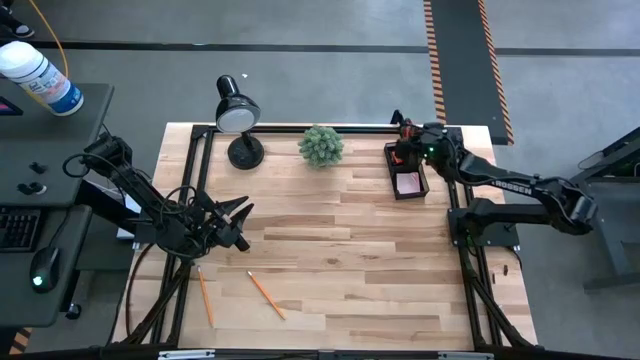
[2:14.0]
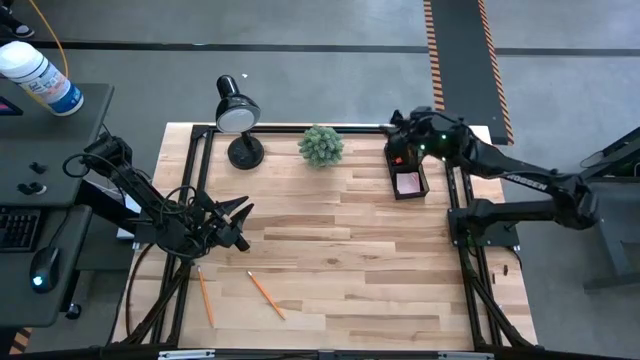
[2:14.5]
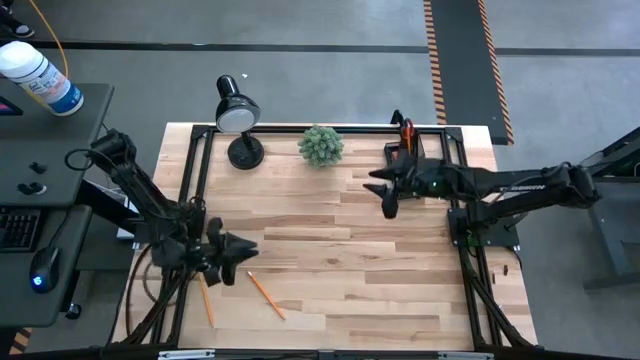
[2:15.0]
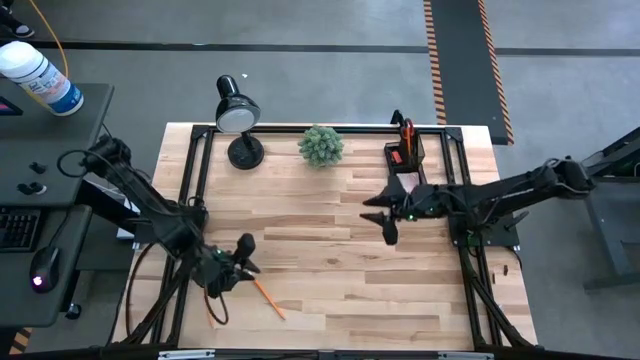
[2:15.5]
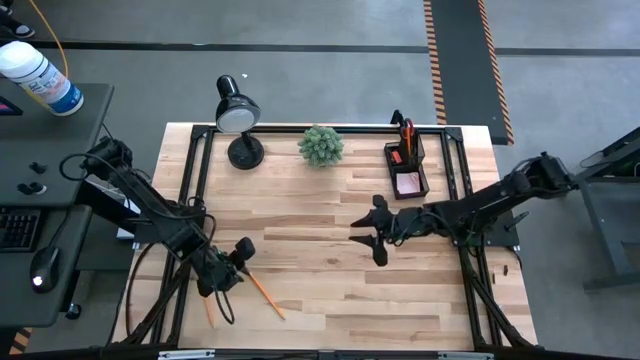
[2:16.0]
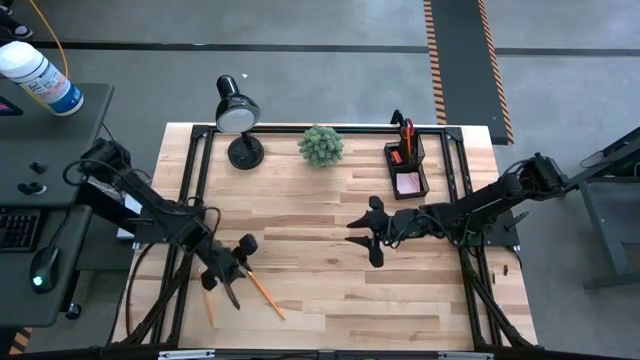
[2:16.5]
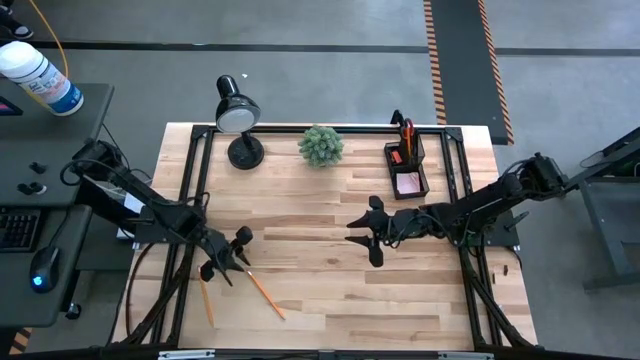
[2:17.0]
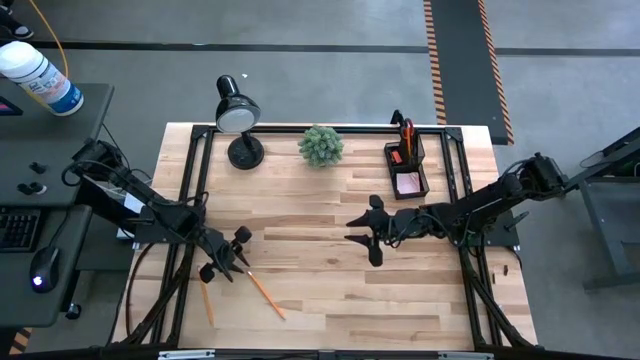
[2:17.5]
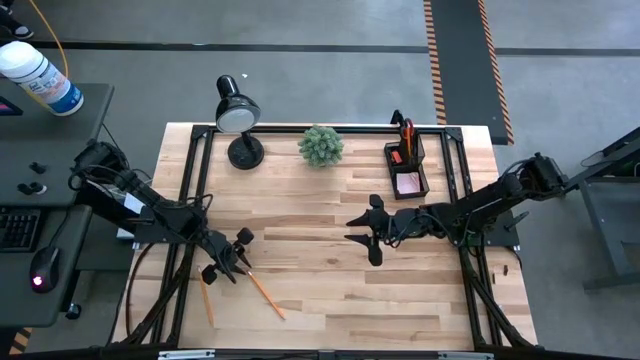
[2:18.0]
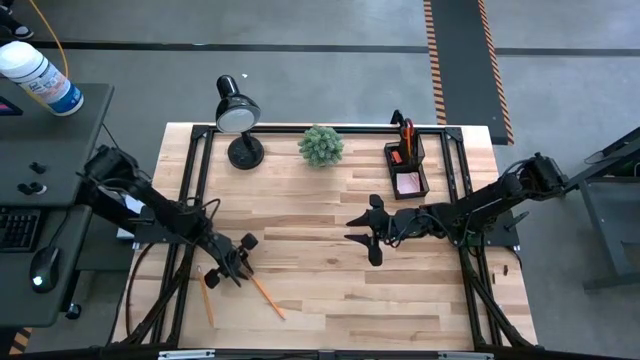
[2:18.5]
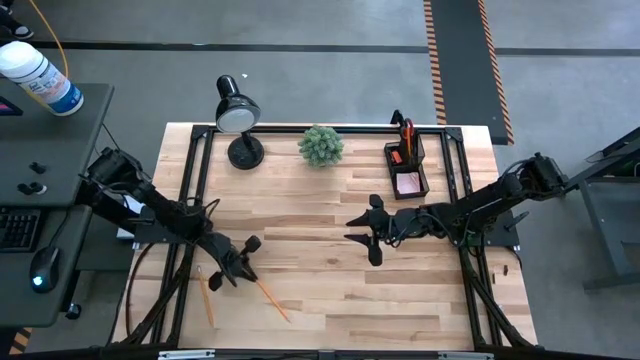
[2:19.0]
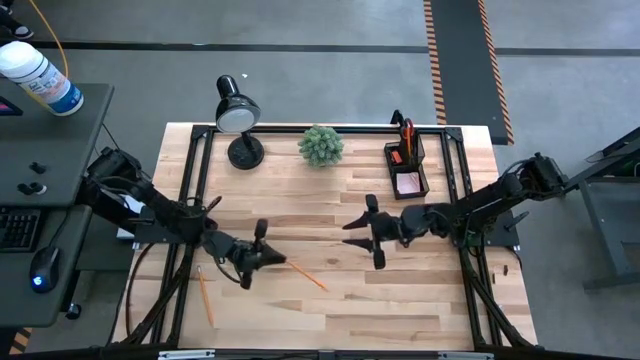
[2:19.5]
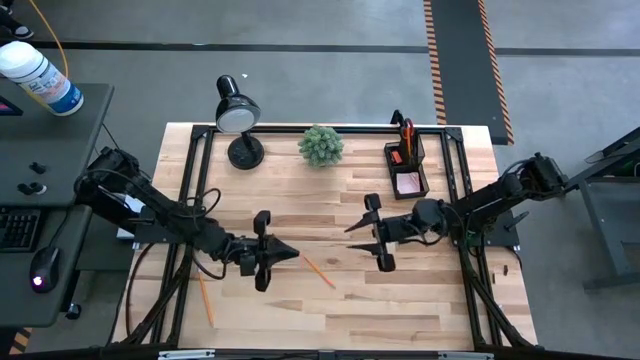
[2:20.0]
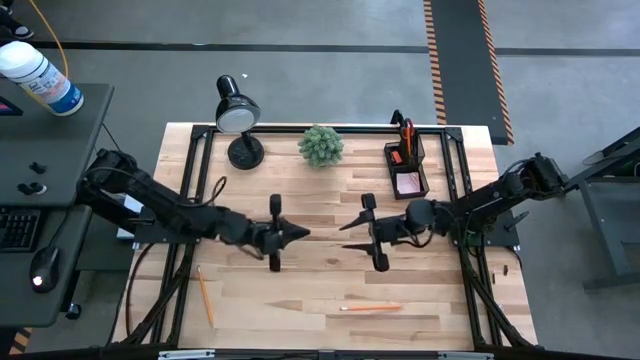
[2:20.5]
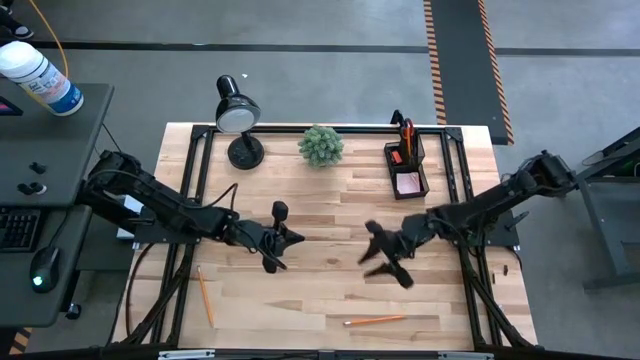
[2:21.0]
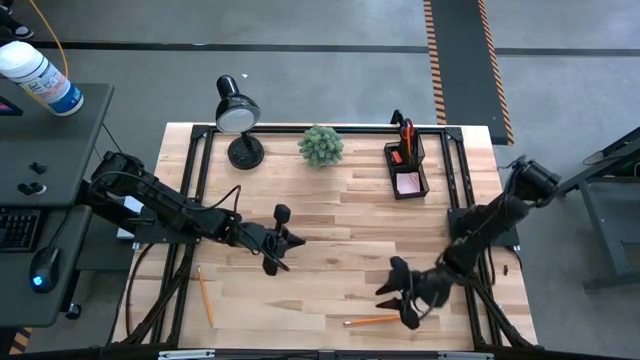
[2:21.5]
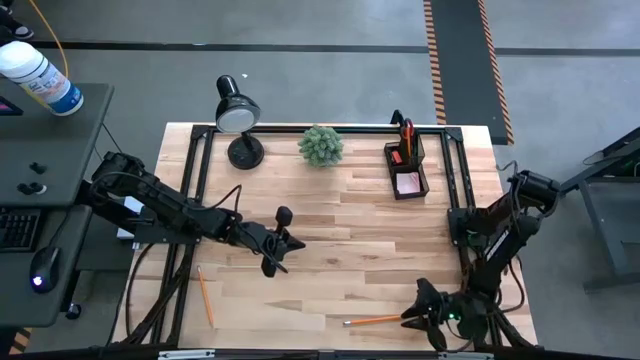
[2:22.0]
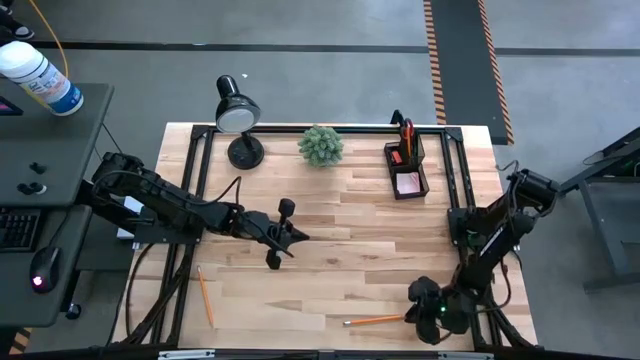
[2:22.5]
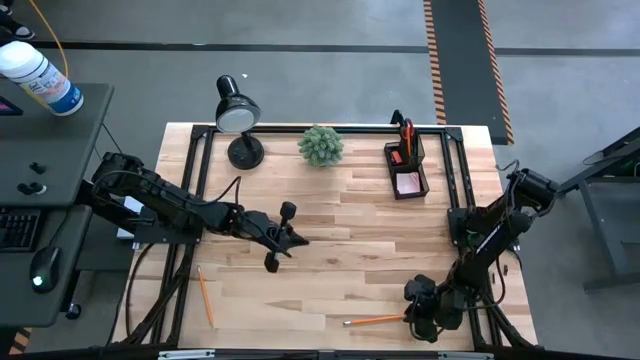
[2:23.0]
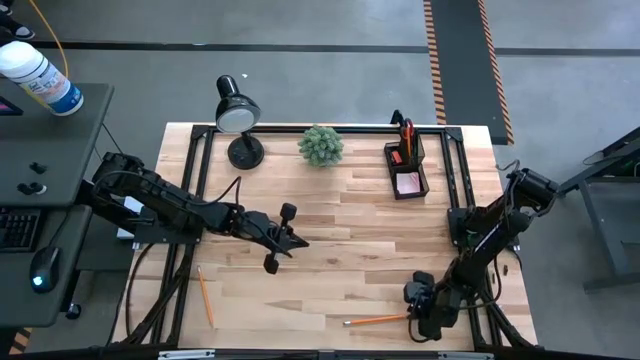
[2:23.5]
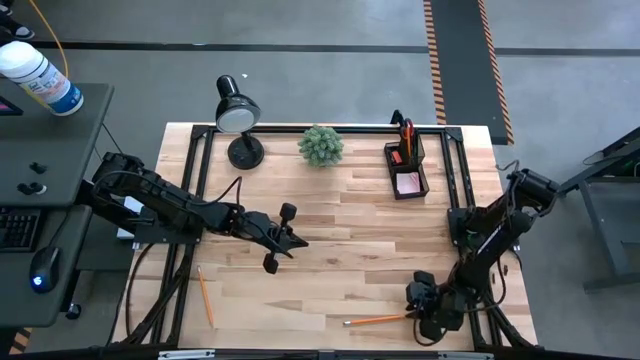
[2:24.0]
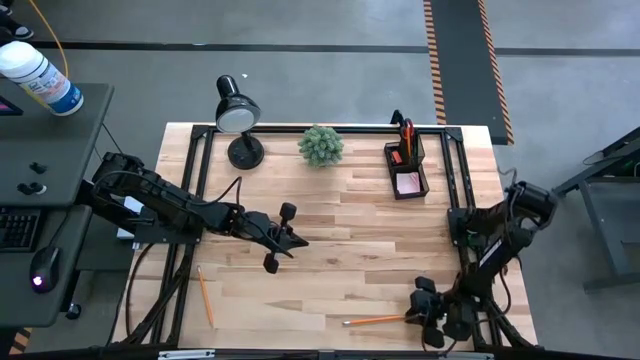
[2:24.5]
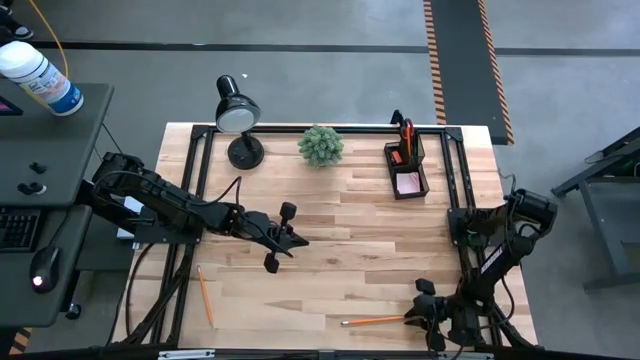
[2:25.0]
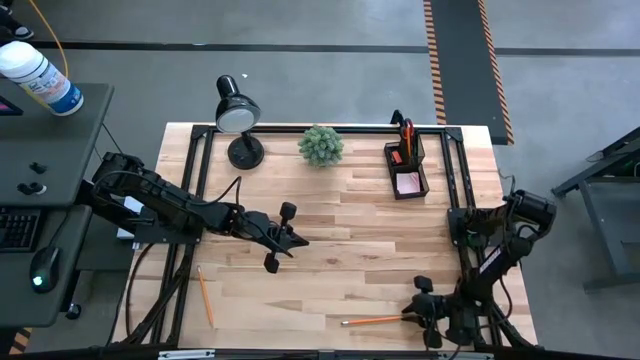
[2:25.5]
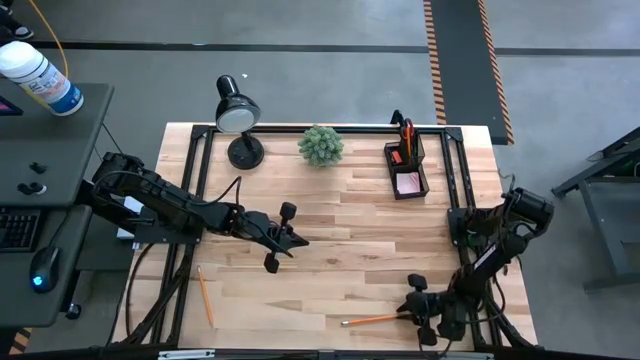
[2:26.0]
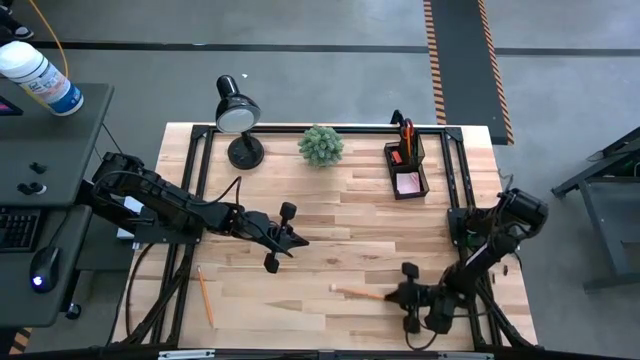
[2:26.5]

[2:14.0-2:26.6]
Task: Pick and place office supplies into organizer
Put the right pencil into the desk organizer

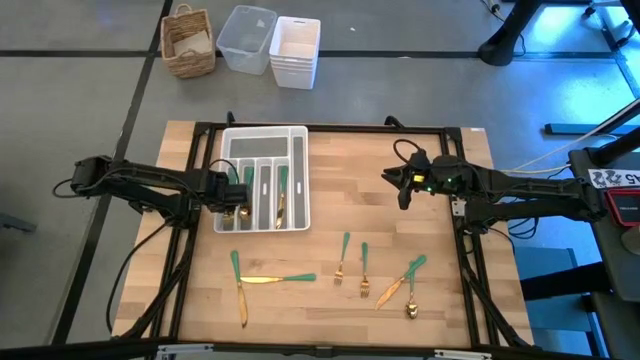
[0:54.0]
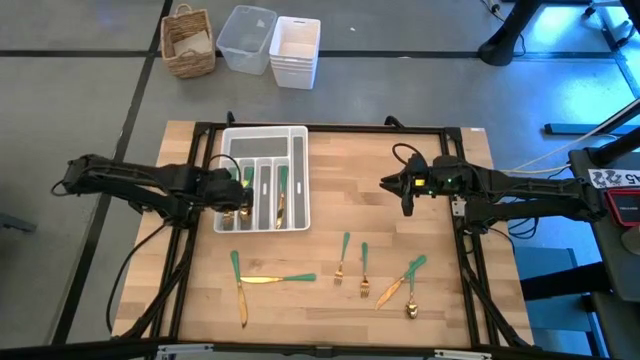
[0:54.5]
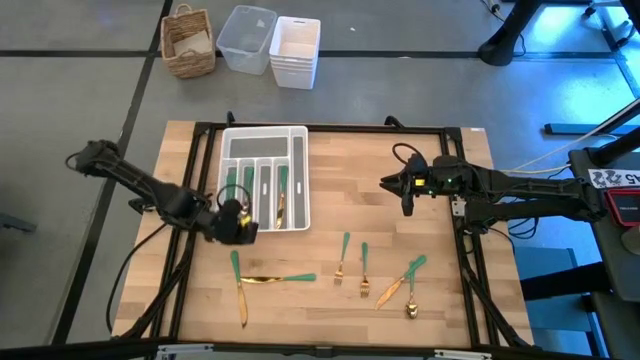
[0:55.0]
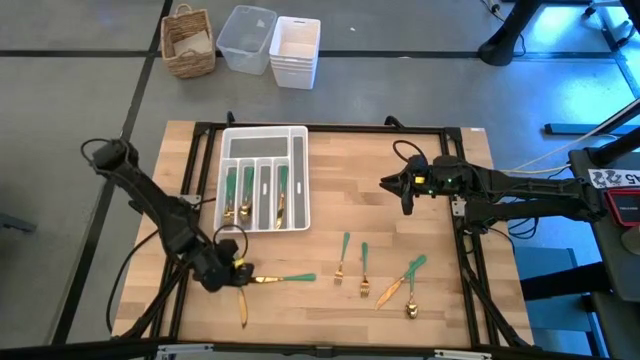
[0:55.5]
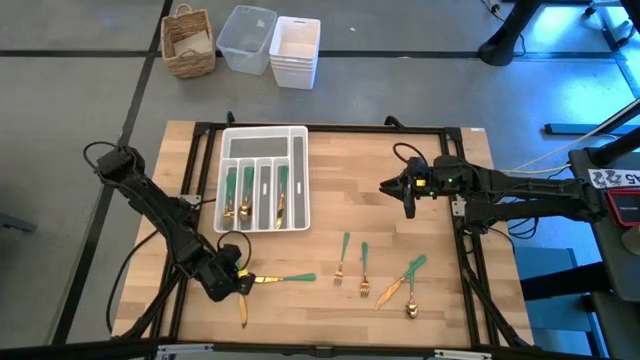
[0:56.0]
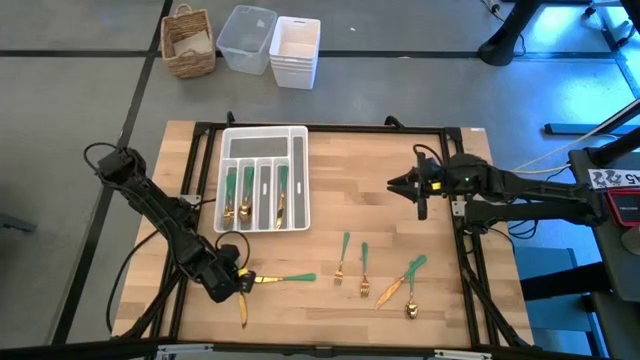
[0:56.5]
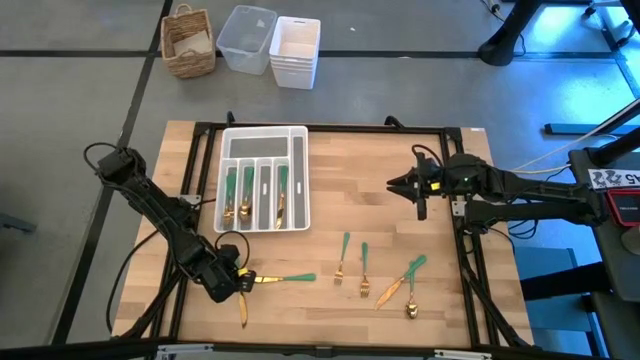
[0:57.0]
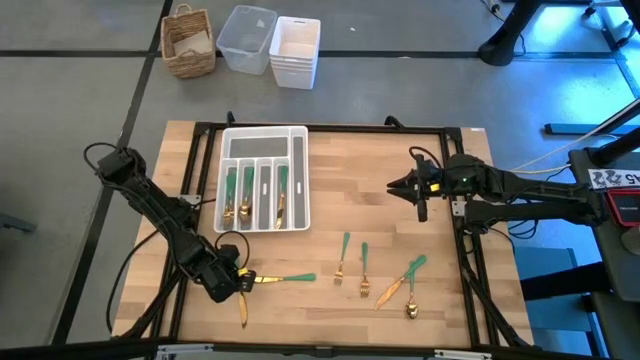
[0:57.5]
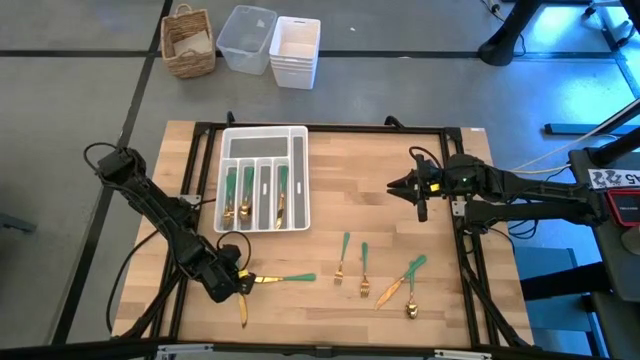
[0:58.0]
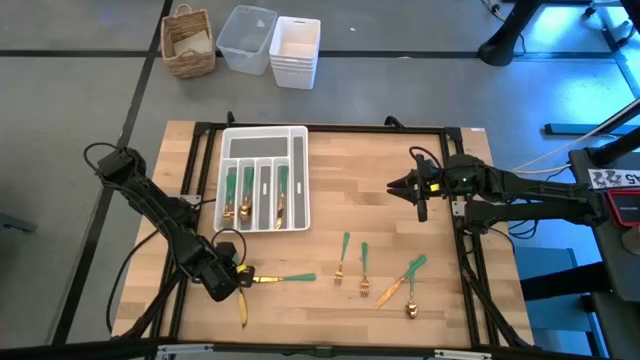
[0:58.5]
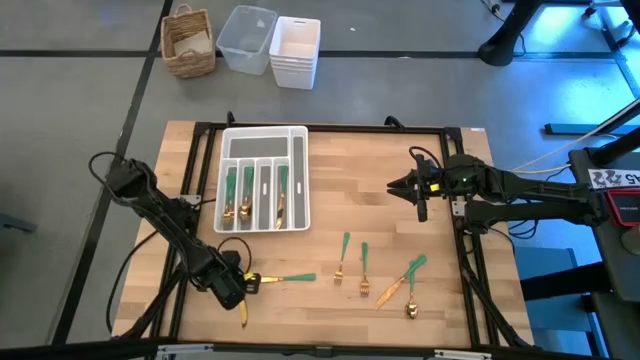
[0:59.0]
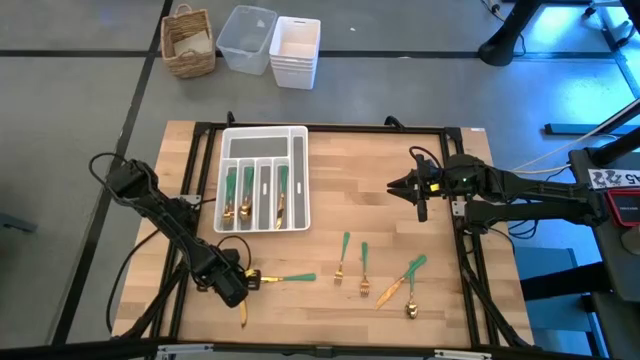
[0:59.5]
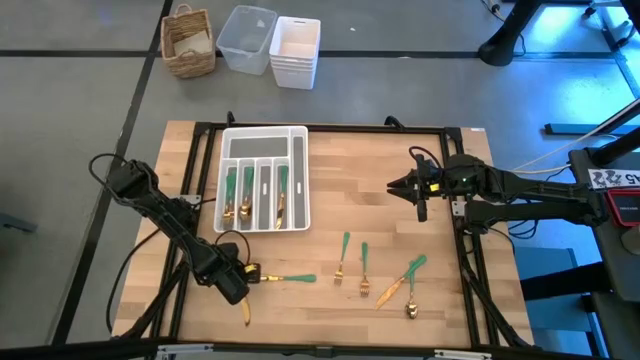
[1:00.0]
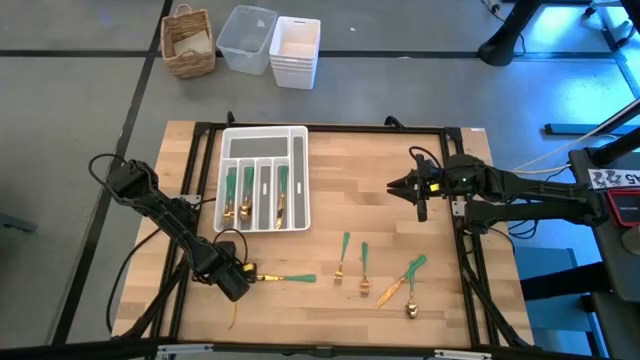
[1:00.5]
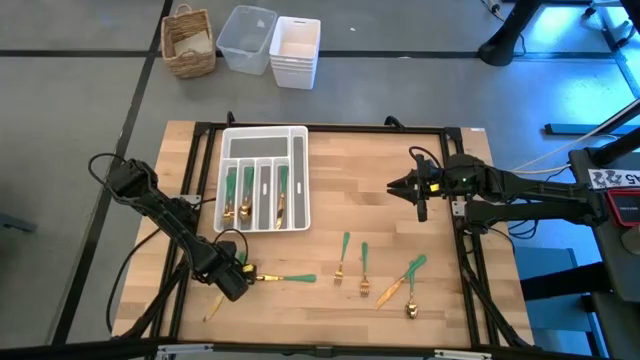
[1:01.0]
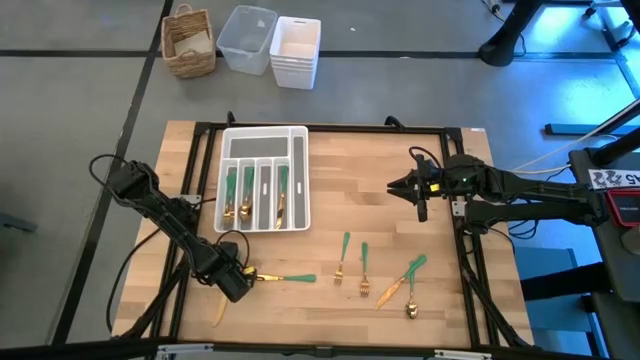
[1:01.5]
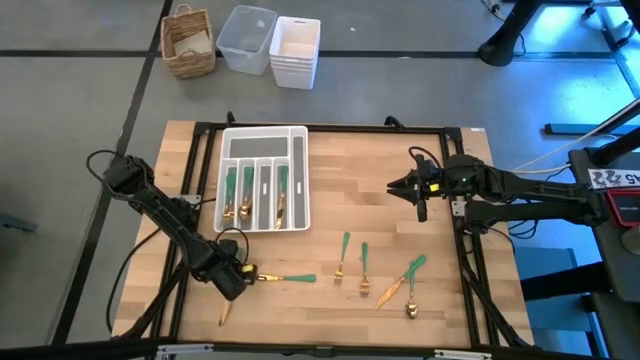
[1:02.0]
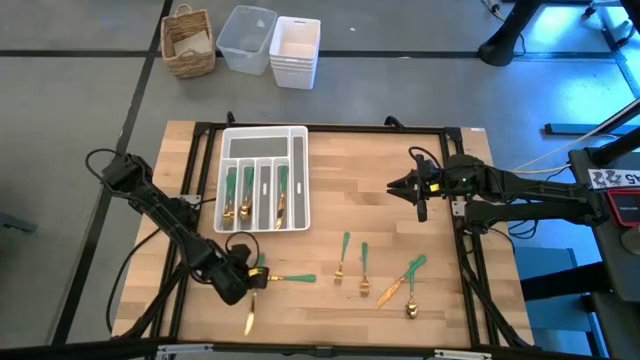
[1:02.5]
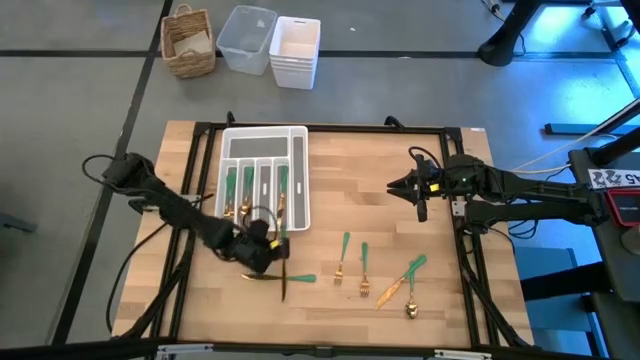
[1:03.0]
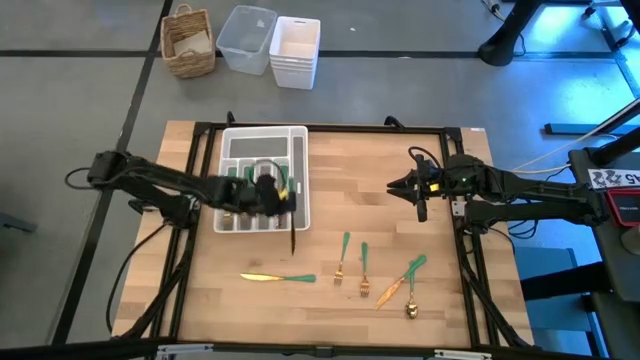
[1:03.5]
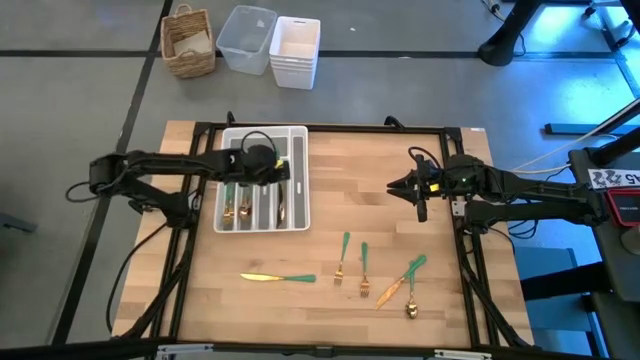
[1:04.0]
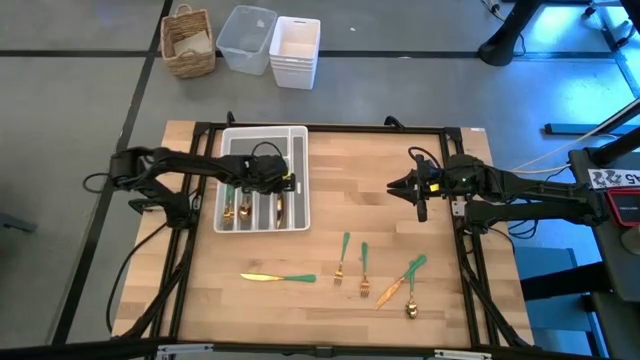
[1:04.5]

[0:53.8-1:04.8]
Task: Sort silverware
Put the green knife into the white silverware tray
